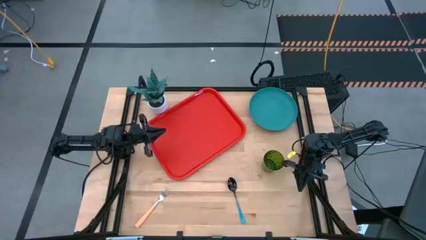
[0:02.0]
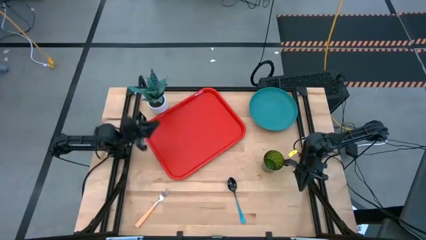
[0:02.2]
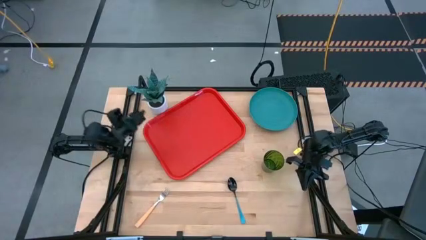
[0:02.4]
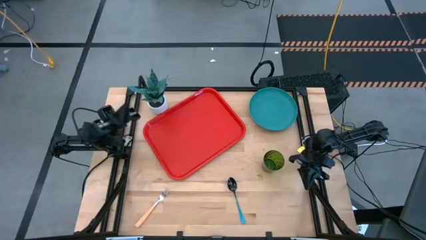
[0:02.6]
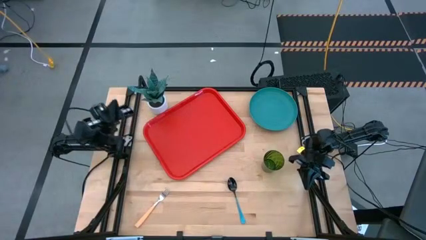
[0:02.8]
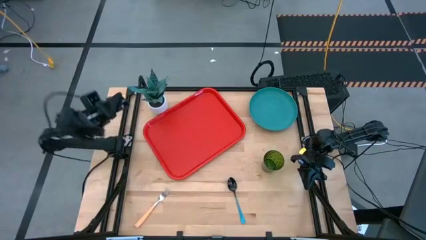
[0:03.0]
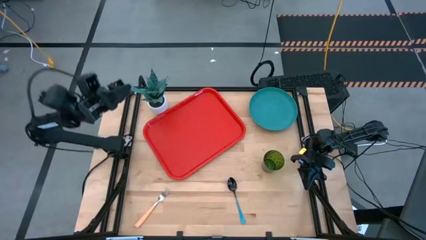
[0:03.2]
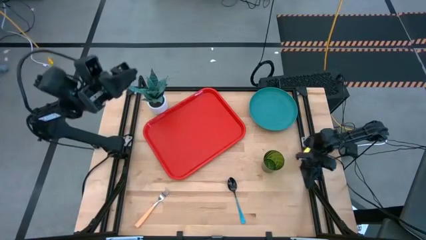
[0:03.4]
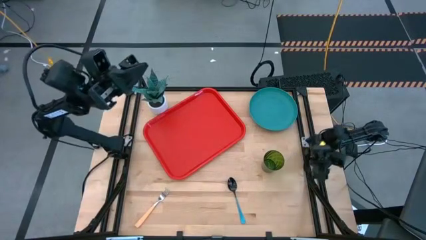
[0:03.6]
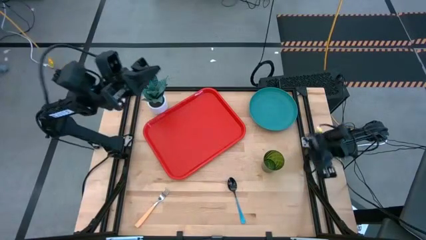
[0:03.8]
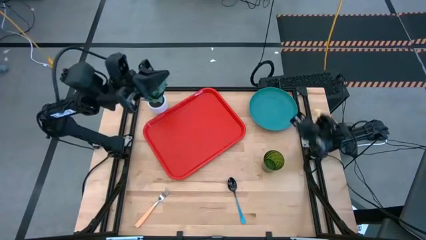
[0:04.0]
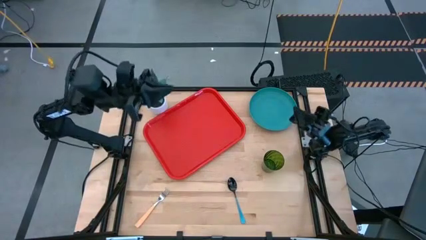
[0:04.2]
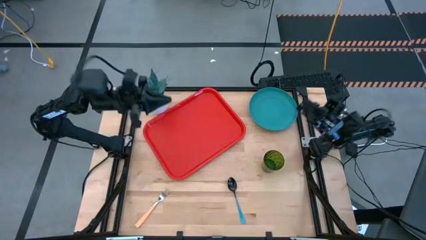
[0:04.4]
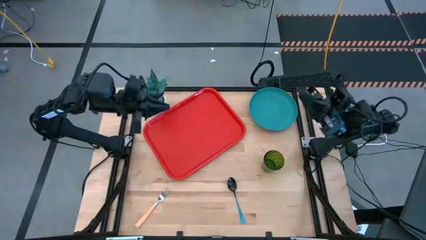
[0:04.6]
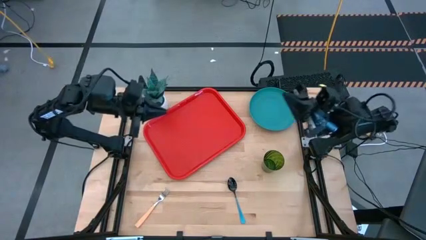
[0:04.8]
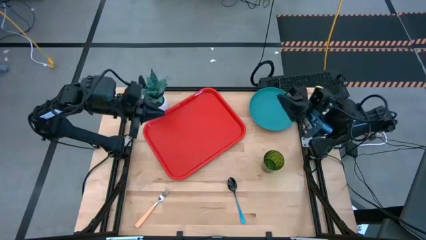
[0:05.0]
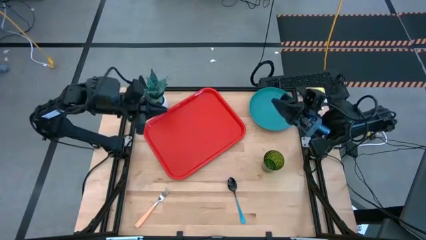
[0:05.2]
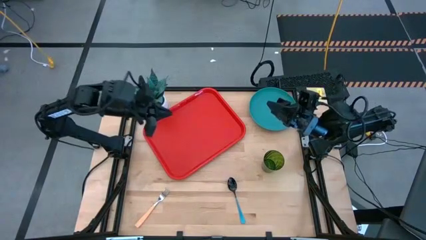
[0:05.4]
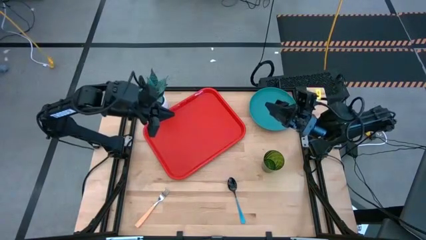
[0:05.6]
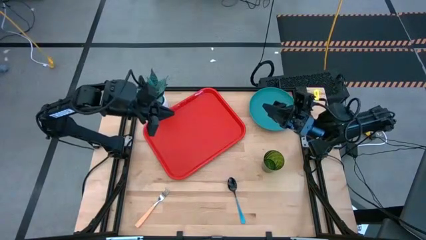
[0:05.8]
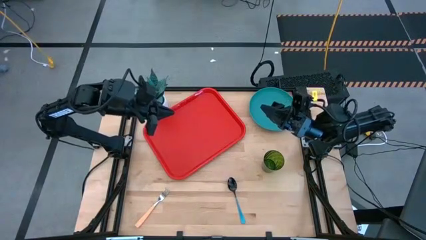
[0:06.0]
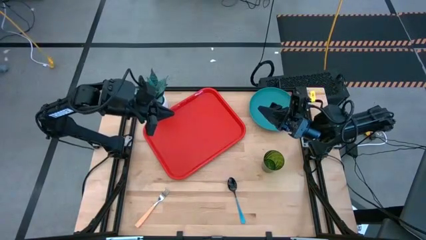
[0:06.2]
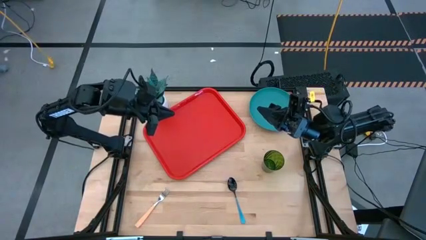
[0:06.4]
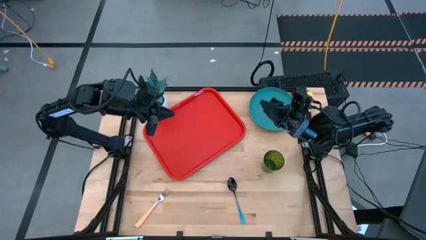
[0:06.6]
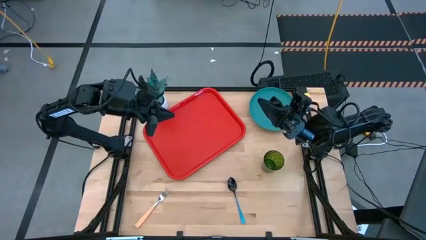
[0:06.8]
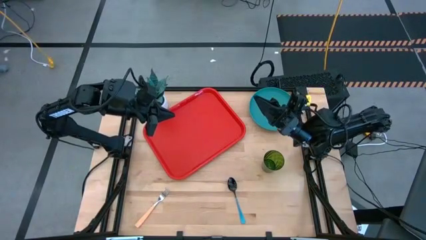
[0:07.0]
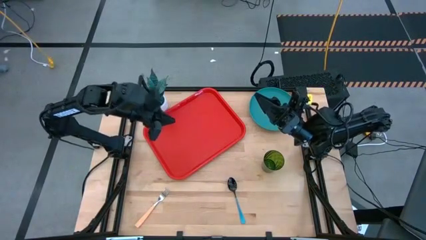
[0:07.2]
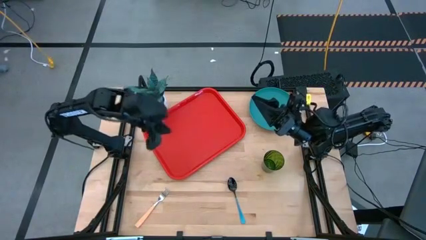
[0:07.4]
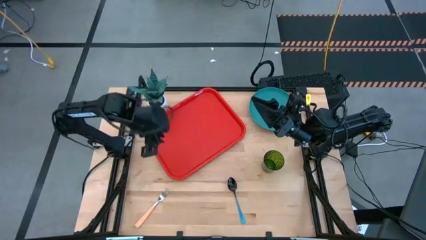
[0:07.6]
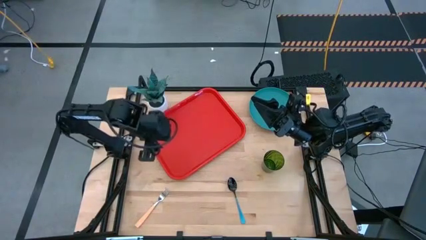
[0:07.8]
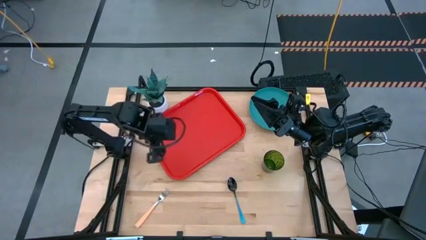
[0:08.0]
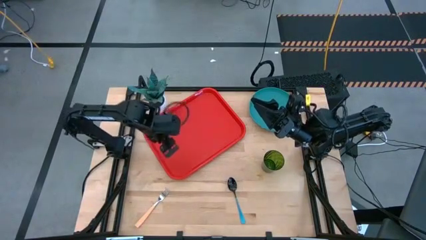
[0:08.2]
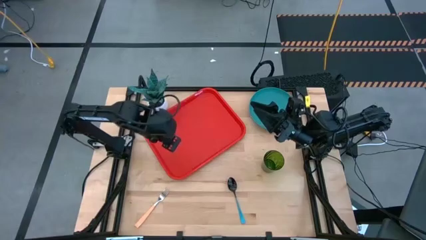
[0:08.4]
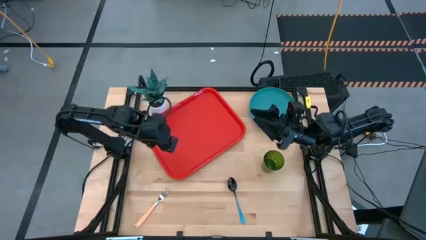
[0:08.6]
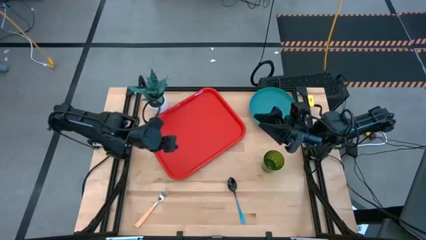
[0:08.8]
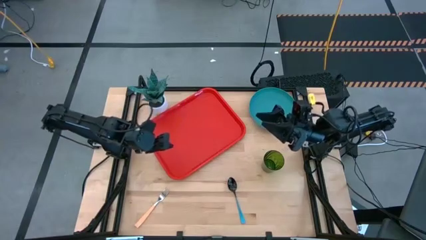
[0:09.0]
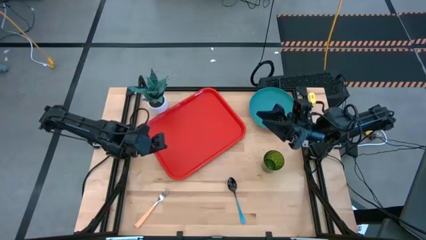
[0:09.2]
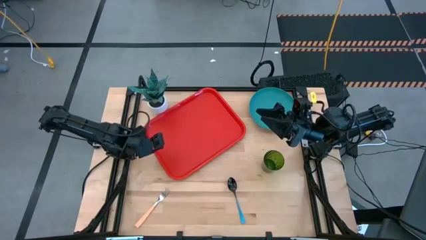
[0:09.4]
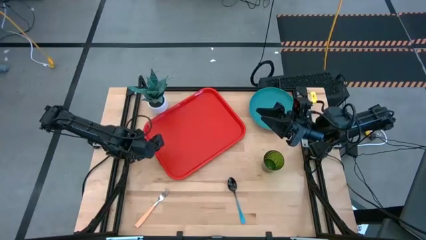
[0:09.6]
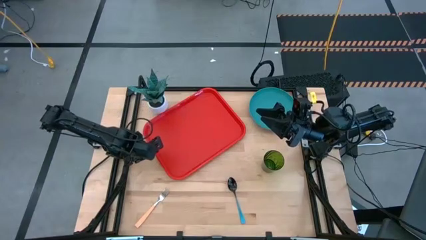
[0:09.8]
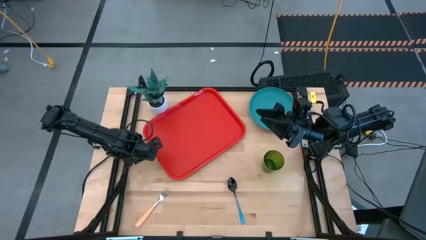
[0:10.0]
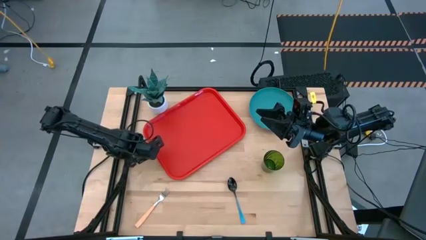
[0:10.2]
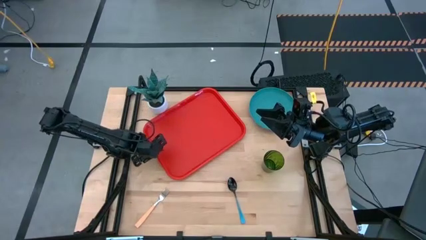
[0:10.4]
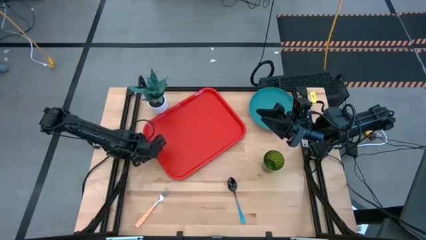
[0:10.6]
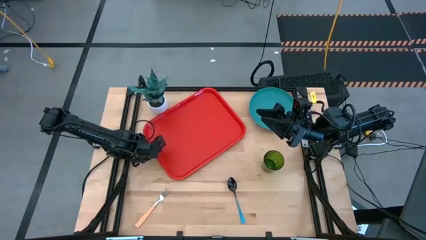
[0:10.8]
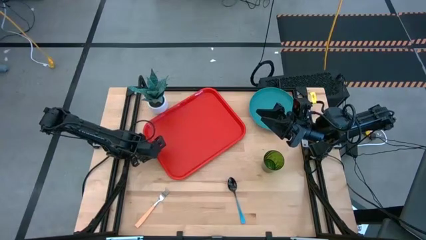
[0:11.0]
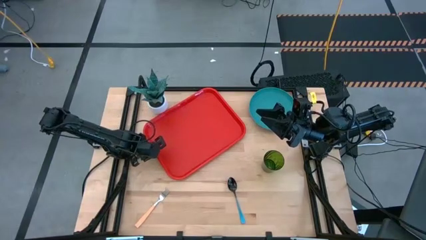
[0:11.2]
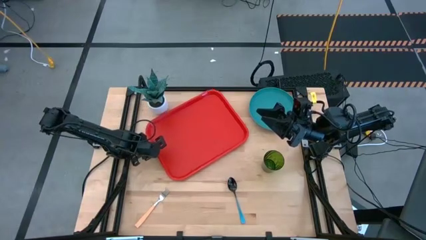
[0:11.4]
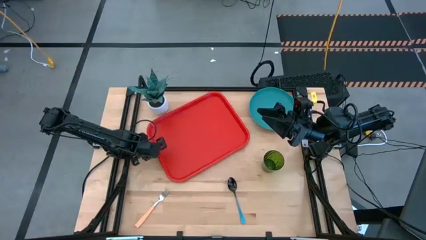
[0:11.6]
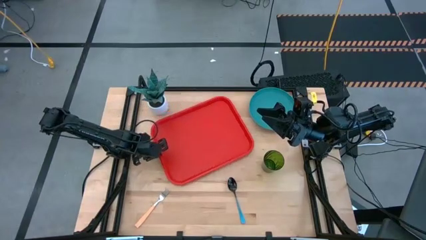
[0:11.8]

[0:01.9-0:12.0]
Task: Pick and place plate/cup/fork/spoon on tray
Move the red tray to the center of the table

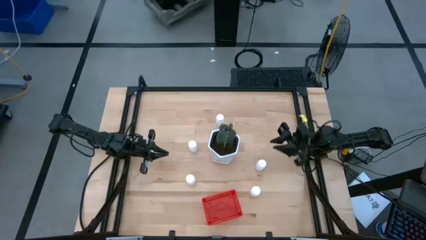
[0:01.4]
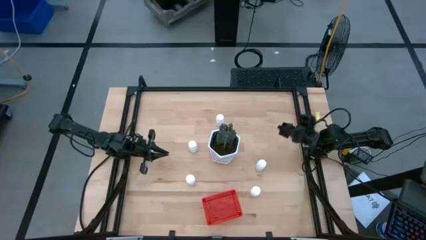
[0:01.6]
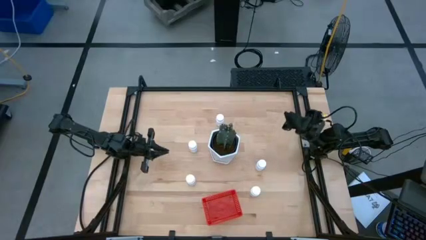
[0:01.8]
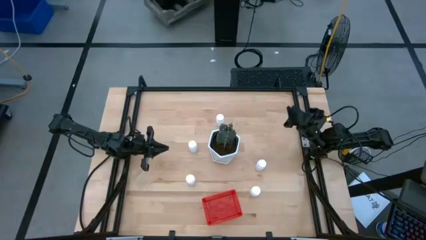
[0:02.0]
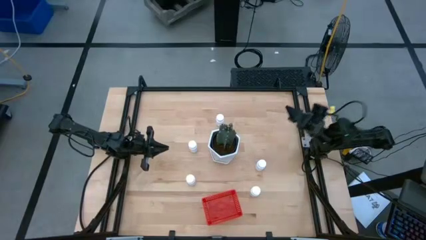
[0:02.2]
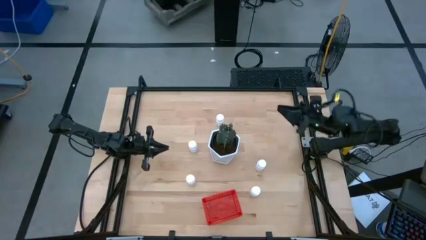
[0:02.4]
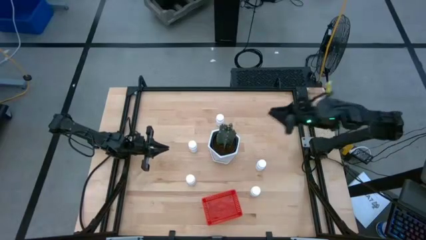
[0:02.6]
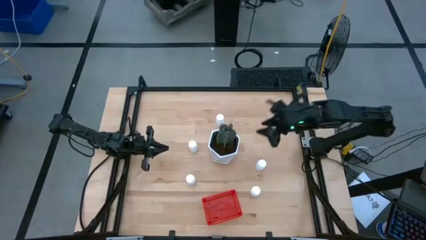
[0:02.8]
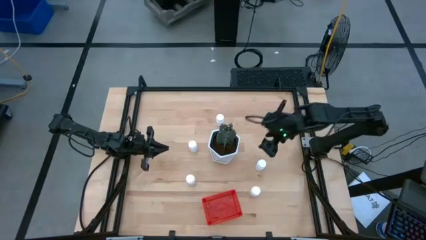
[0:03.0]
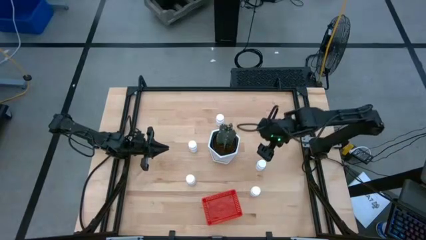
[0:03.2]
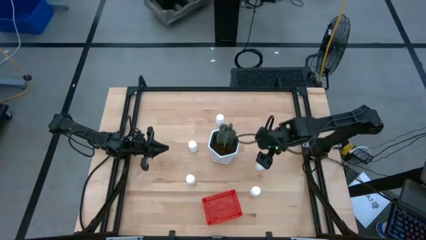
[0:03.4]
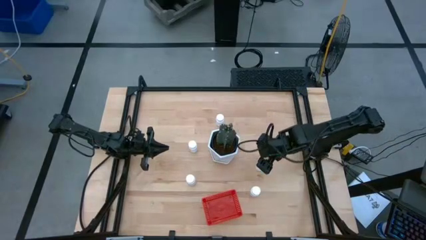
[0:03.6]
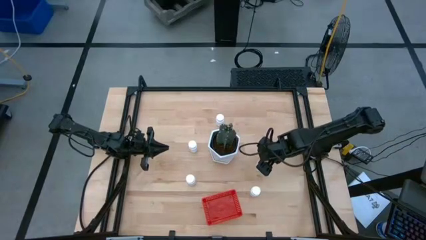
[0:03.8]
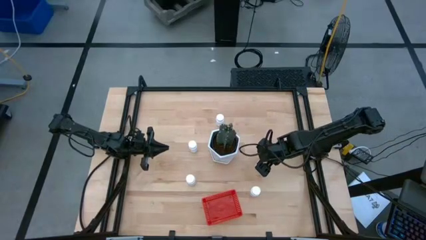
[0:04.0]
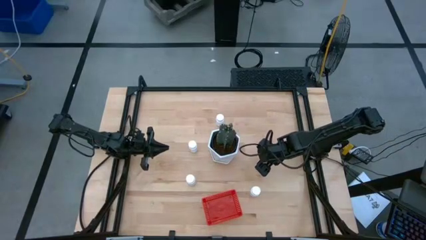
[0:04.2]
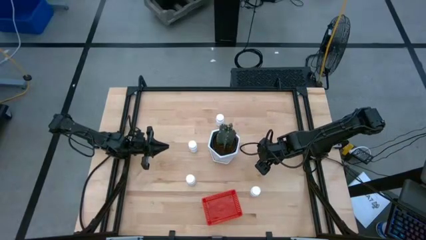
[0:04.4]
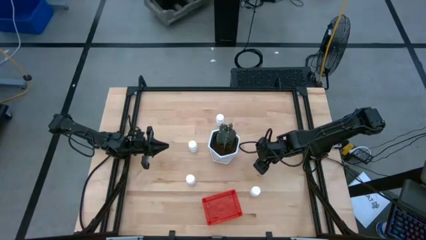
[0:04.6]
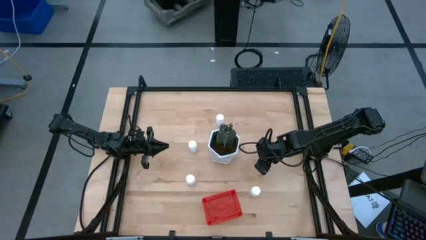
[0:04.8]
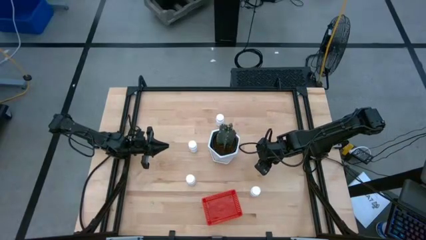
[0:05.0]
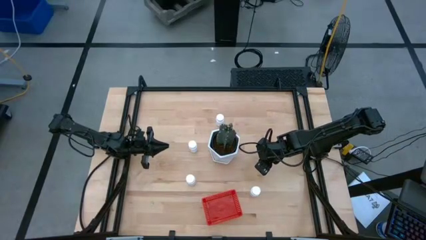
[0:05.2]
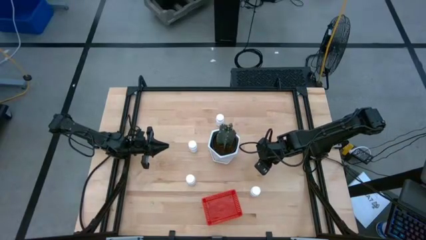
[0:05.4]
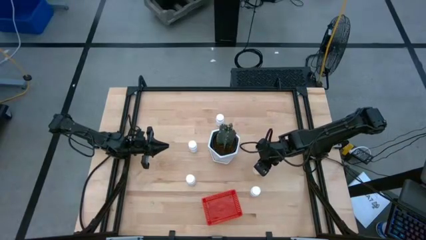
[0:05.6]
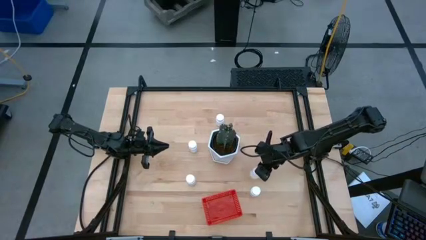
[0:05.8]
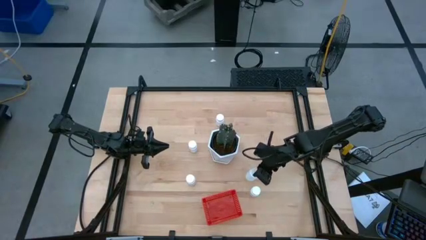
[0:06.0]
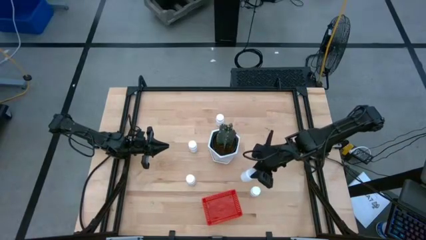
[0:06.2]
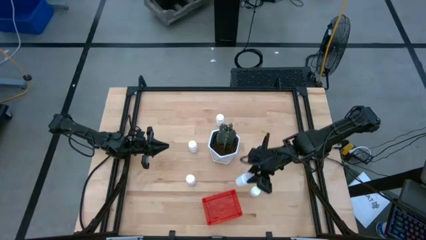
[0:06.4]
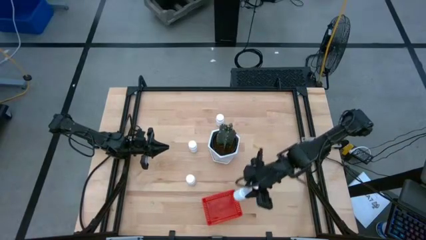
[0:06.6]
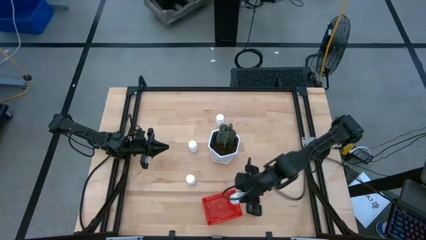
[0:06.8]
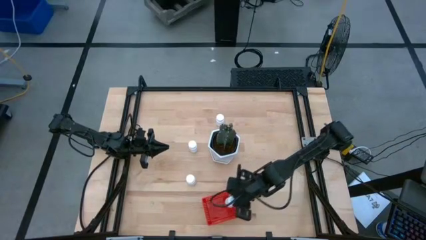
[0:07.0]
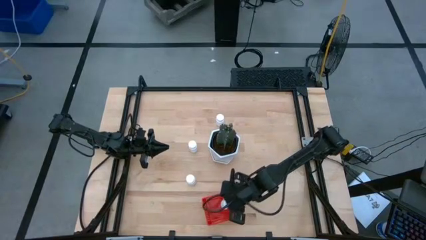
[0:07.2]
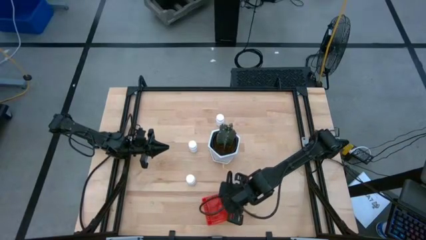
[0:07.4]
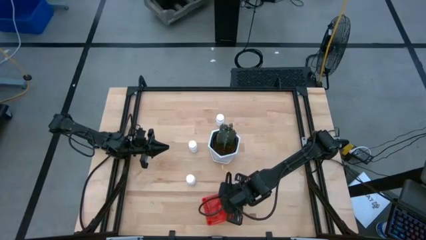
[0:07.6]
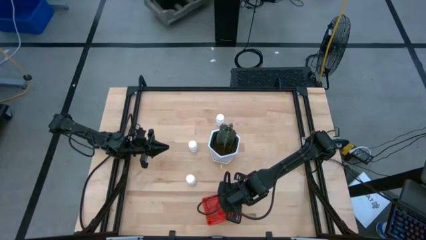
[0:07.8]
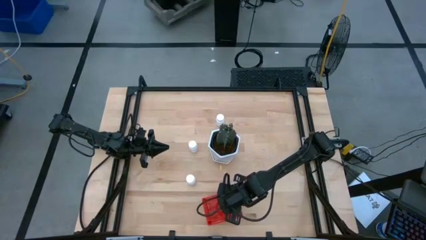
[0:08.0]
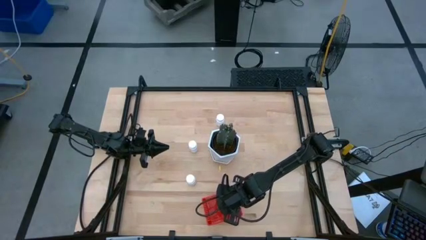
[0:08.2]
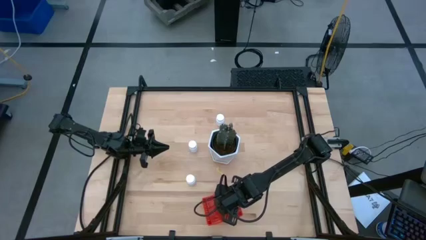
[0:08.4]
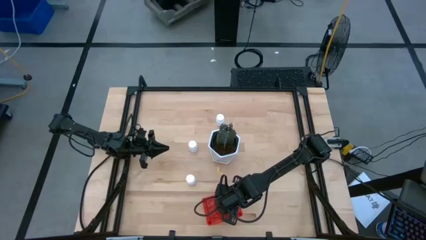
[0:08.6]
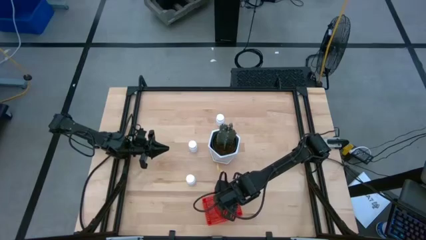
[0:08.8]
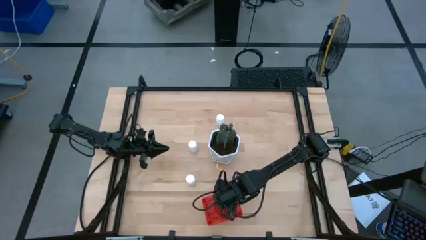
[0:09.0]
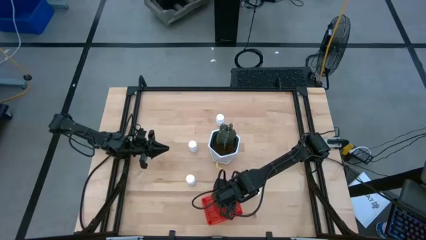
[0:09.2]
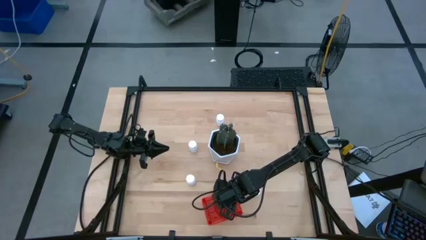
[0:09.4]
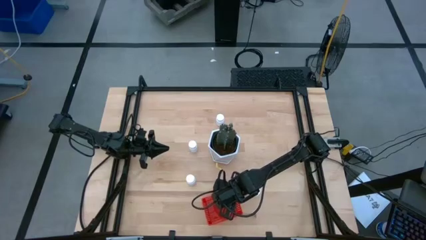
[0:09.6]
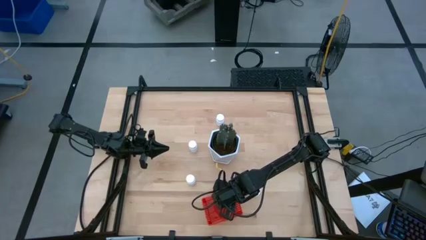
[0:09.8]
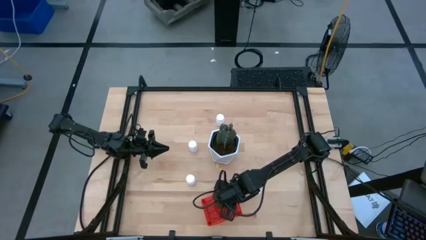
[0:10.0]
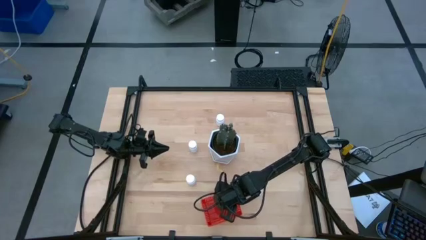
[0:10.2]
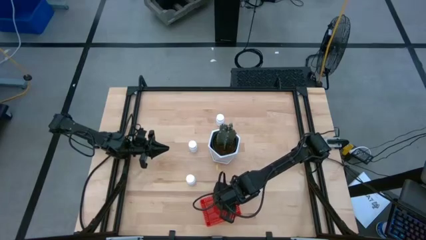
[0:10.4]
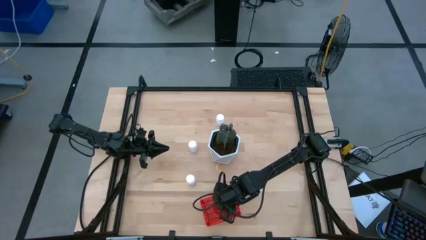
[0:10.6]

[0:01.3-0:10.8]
Task: Pick and place pill bottles into a basket
Put the white medicine bottle into the red bin
